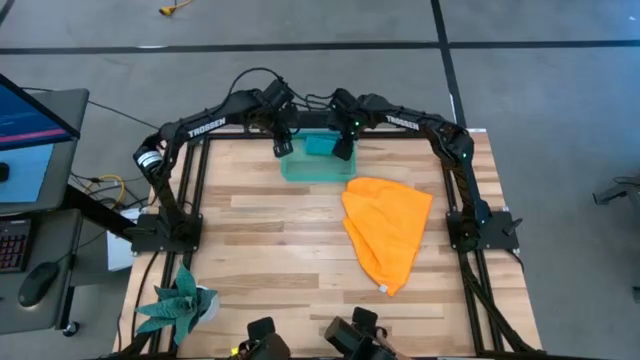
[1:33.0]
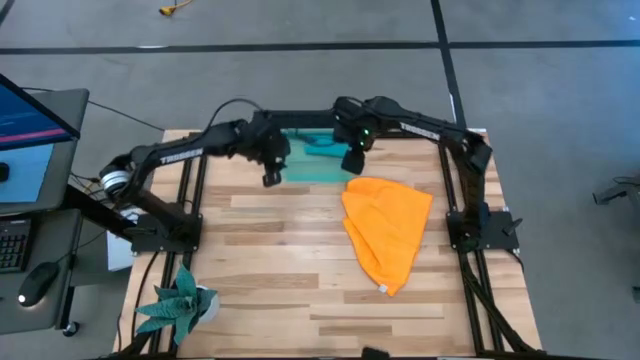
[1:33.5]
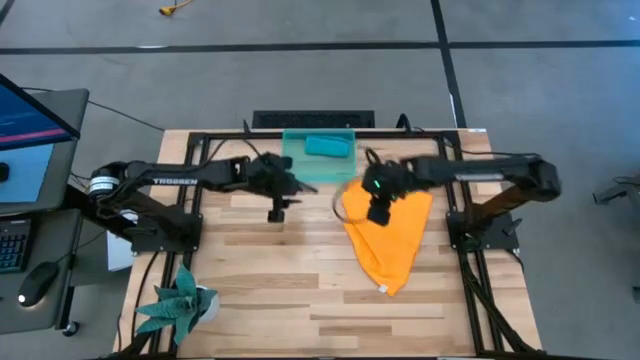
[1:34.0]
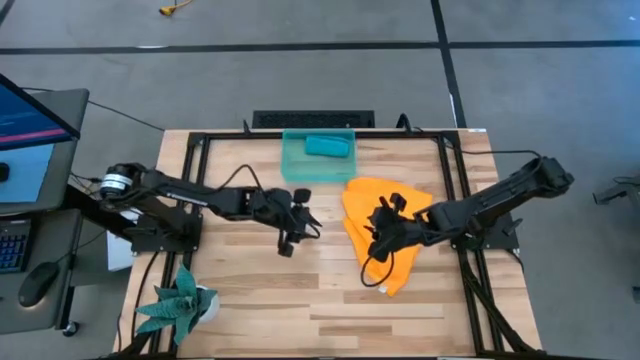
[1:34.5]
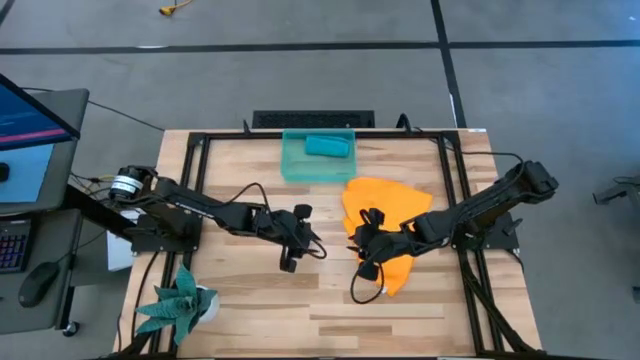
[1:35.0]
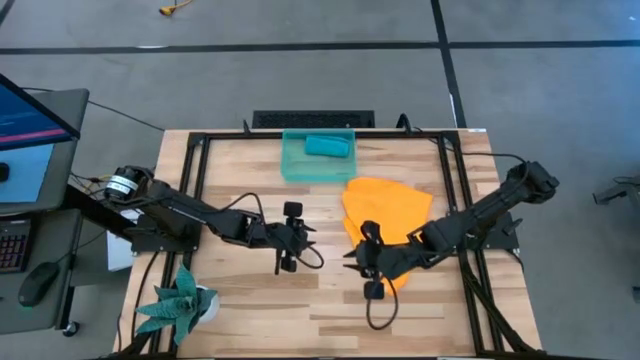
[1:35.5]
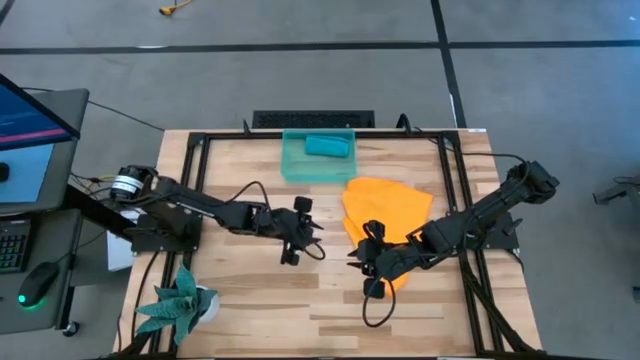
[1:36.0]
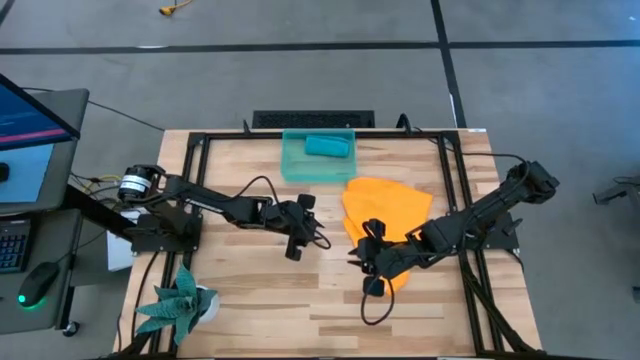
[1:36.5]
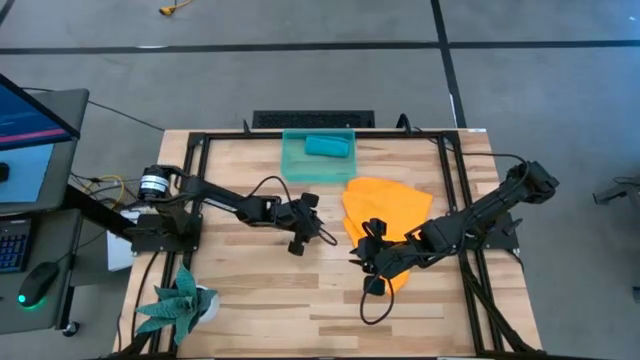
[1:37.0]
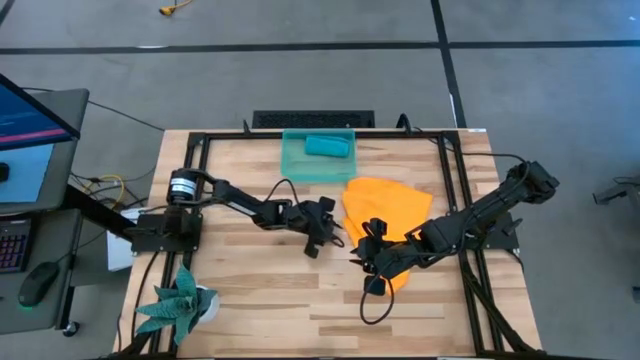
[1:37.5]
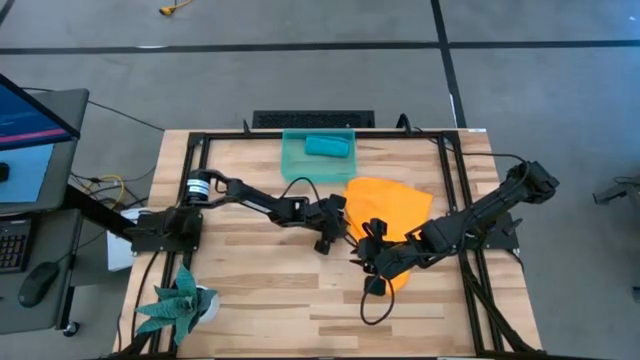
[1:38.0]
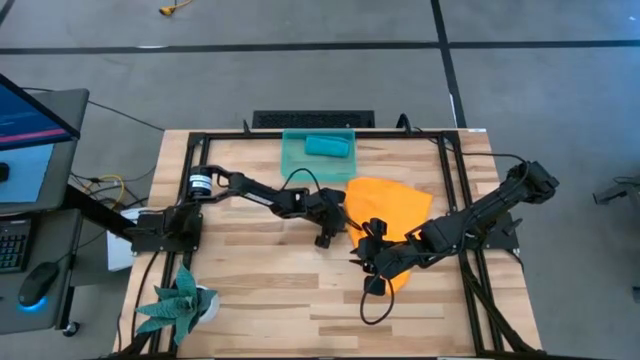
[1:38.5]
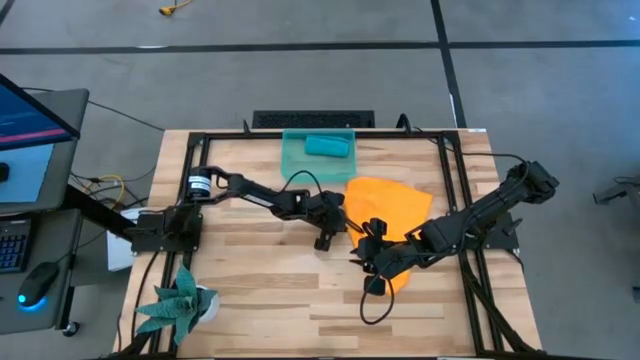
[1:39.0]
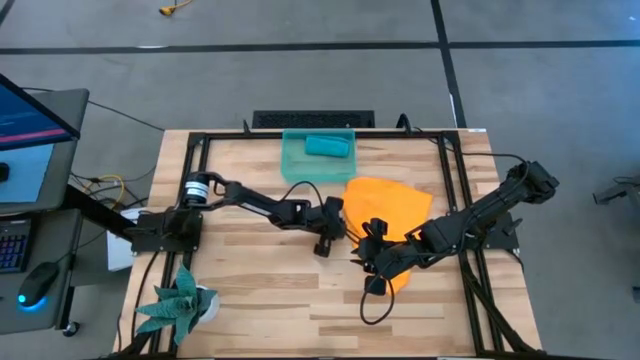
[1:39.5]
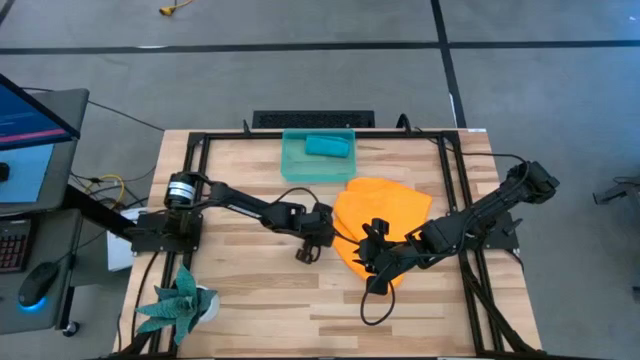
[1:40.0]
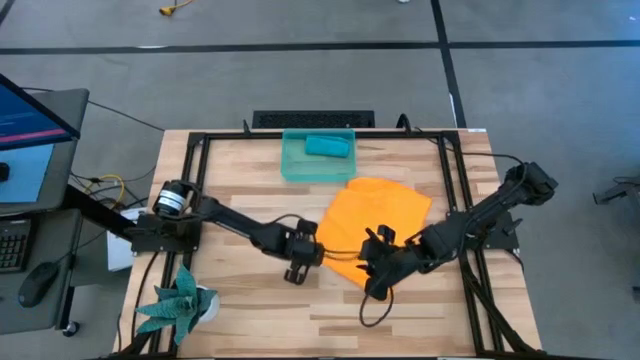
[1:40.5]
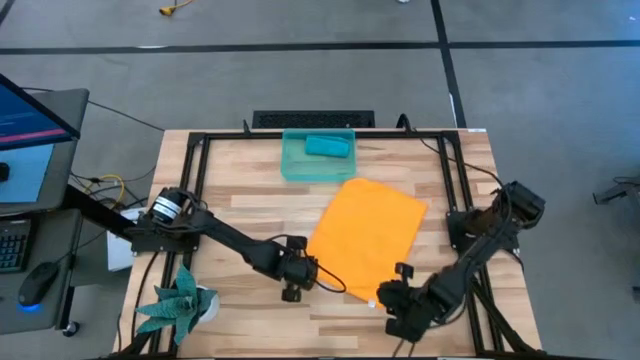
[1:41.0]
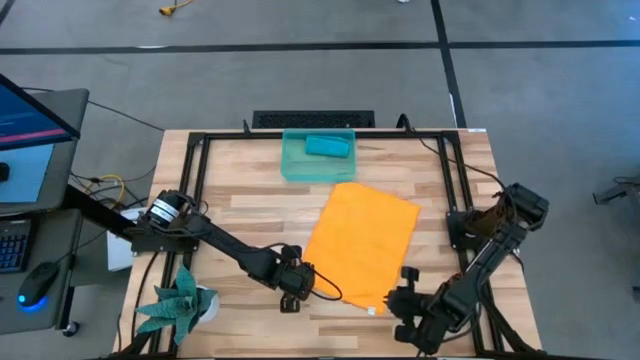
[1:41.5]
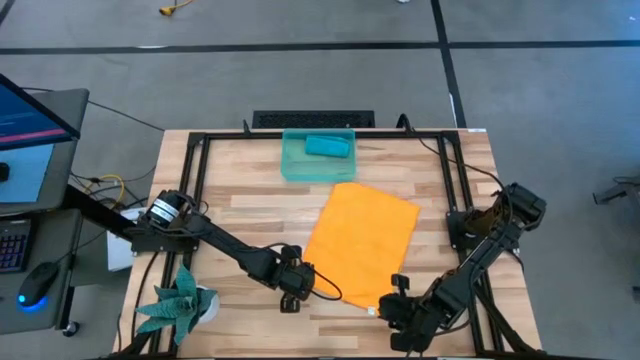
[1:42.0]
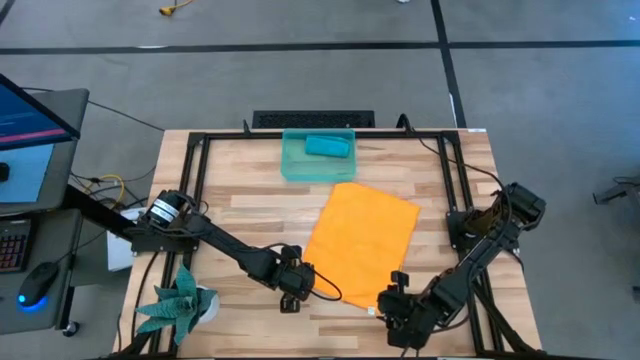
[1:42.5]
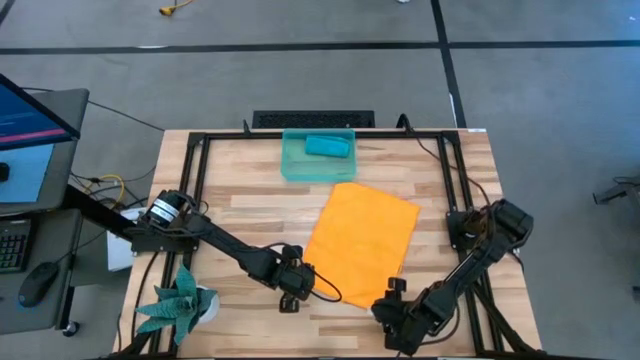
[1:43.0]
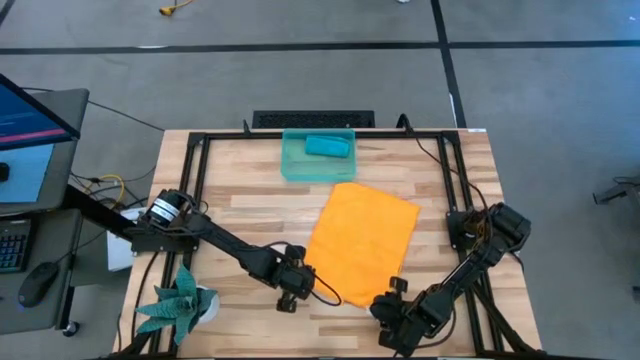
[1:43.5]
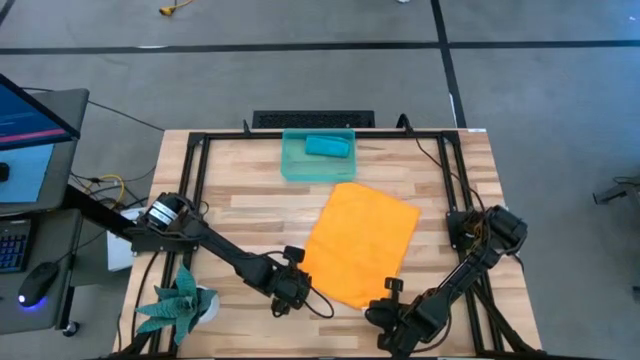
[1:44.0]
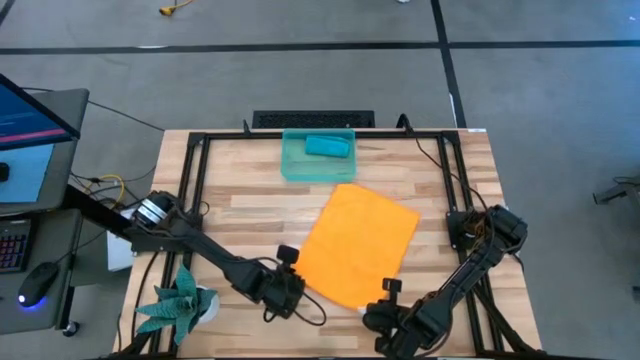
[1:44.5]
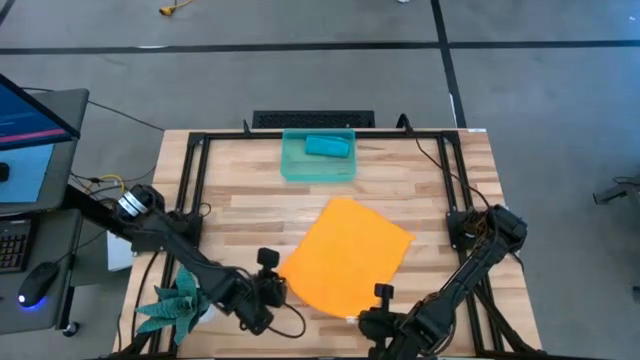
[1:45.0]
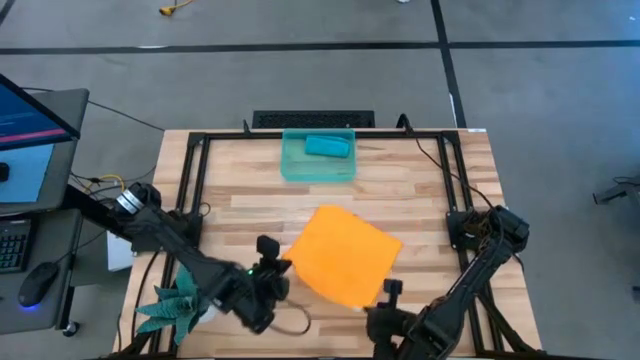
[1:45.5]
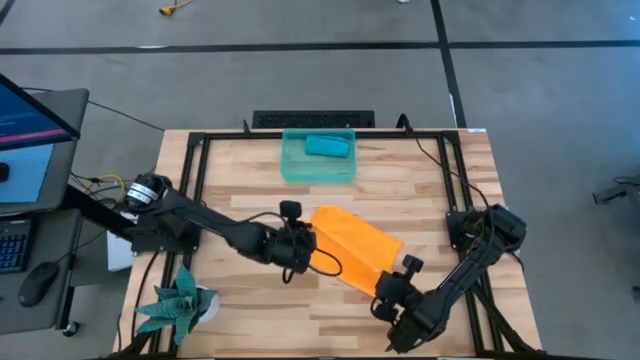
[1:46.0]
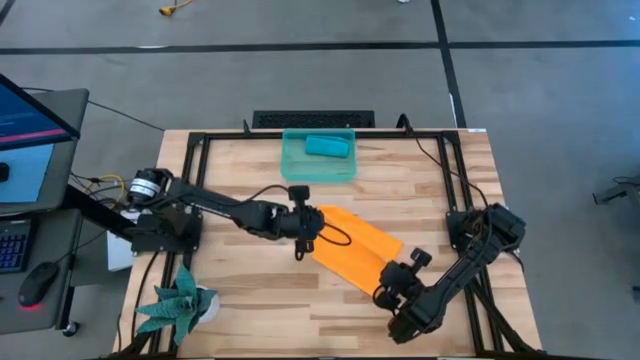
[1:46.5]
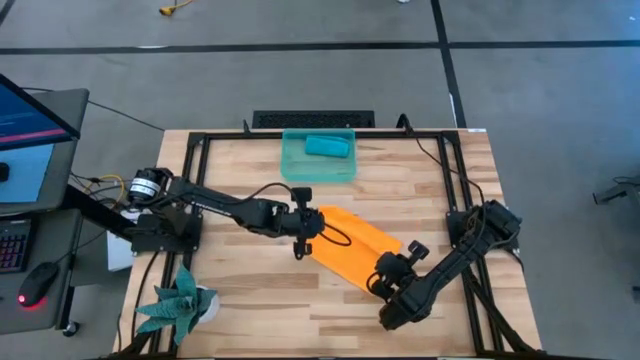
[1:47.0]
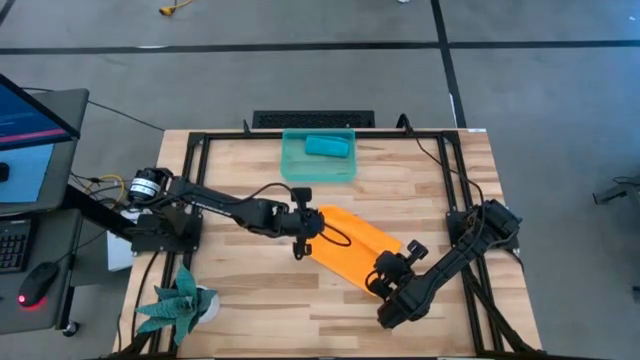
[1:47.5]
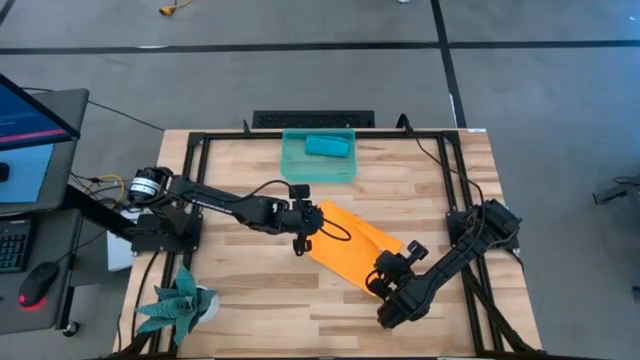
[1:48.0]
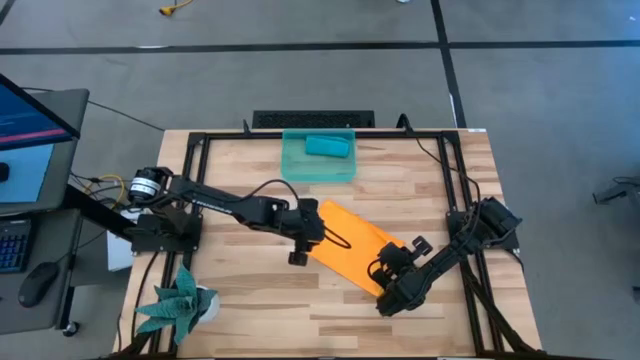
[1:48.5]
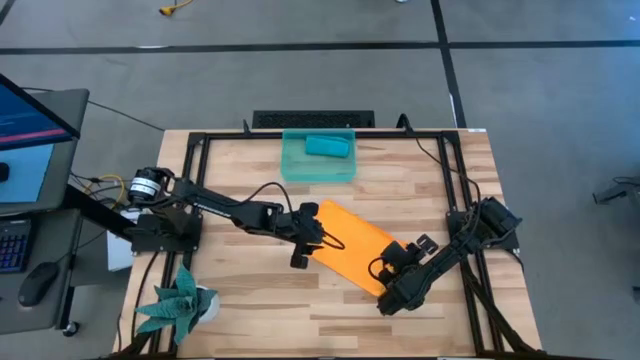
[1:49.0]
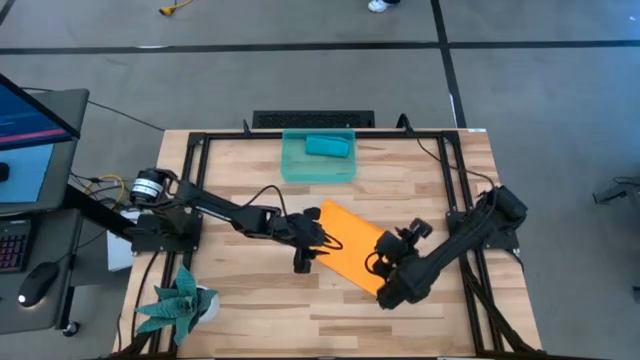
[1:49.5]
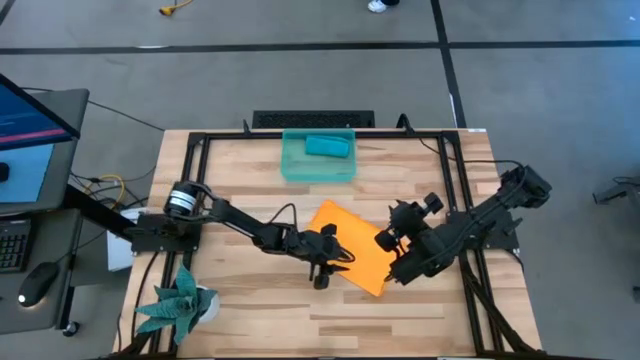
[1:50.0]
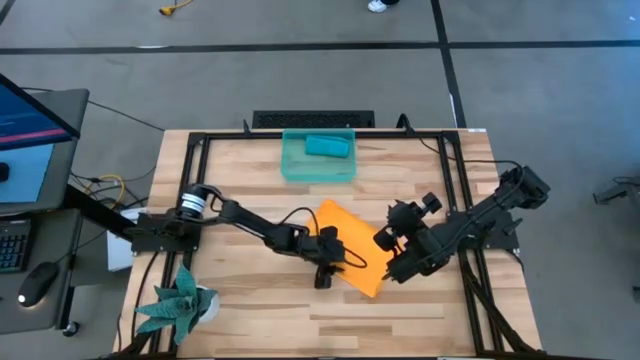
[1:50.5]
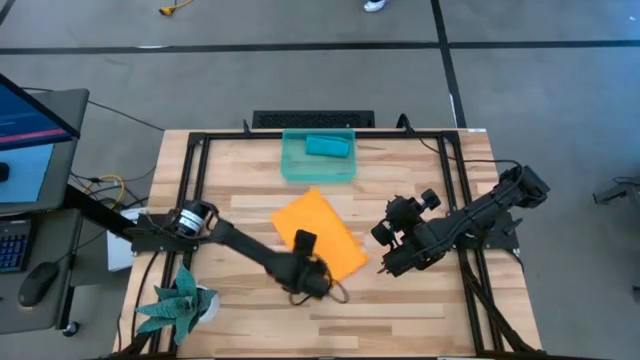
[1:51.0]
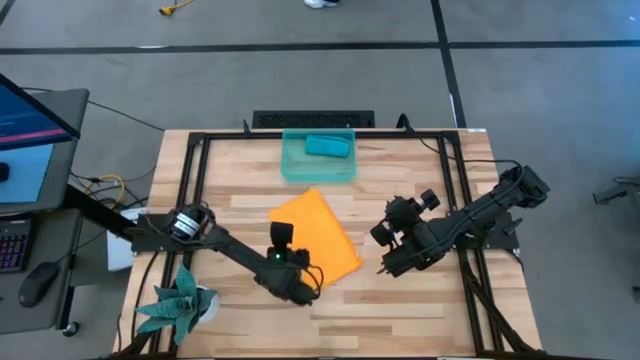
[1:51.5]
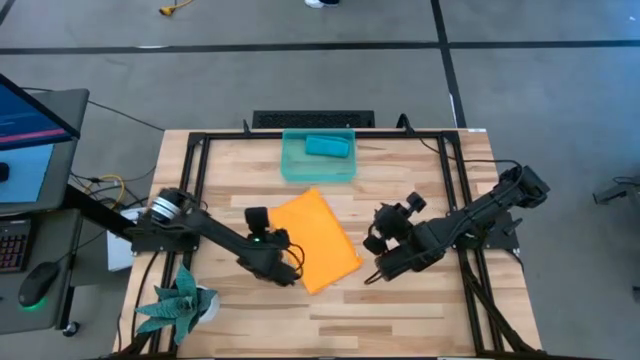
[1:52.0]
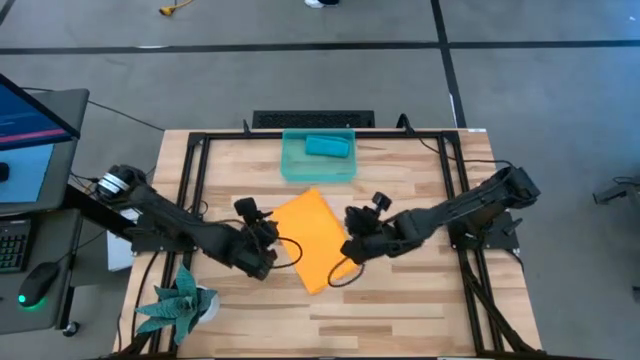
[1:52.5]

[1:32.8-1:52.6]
Task: Roll microfiber towels into tight, uniform cylinder then place into a basket
Roll the yellow microfiber cloth
